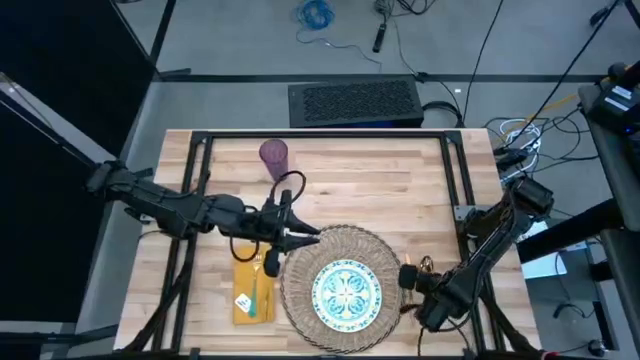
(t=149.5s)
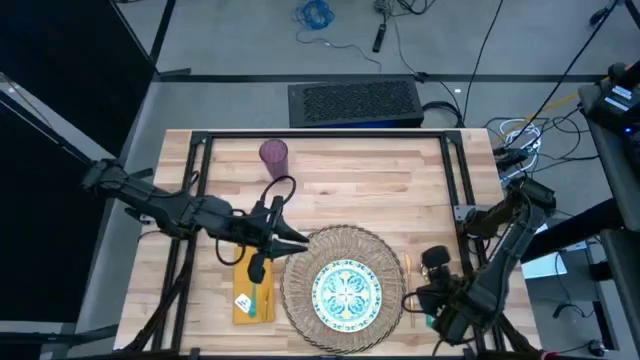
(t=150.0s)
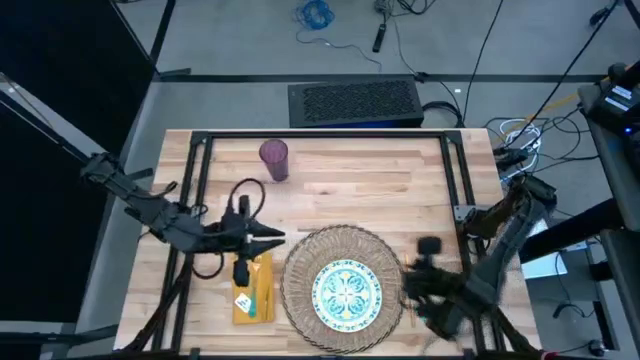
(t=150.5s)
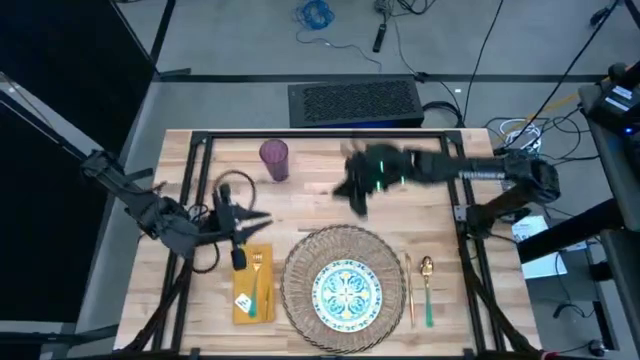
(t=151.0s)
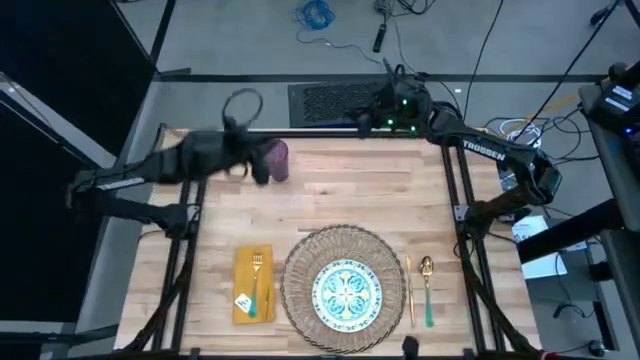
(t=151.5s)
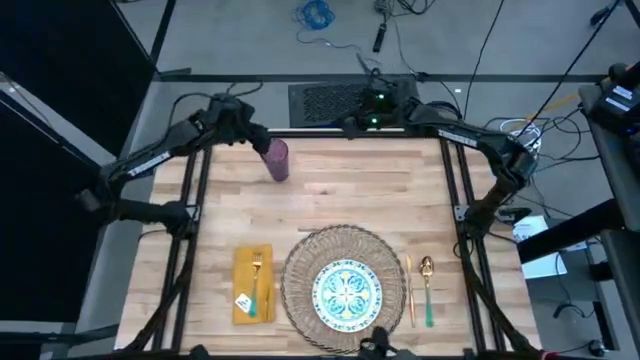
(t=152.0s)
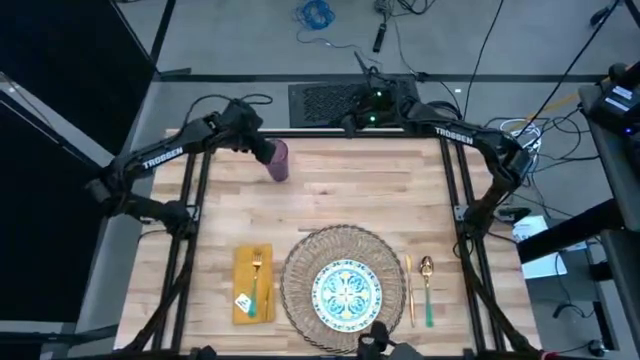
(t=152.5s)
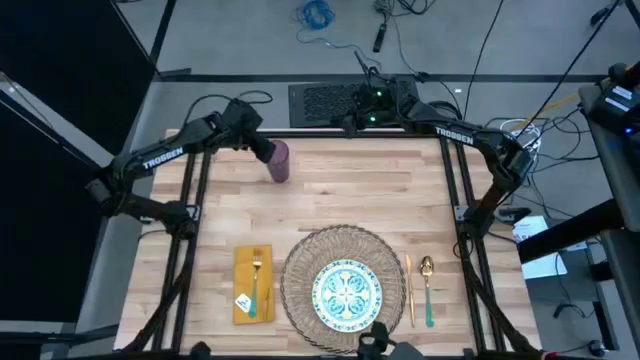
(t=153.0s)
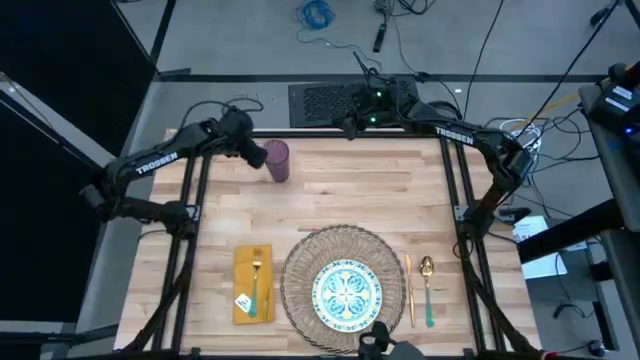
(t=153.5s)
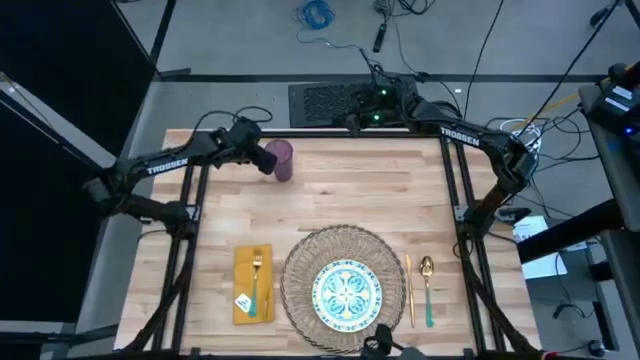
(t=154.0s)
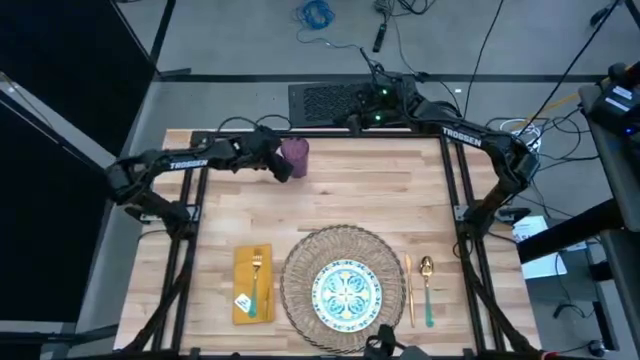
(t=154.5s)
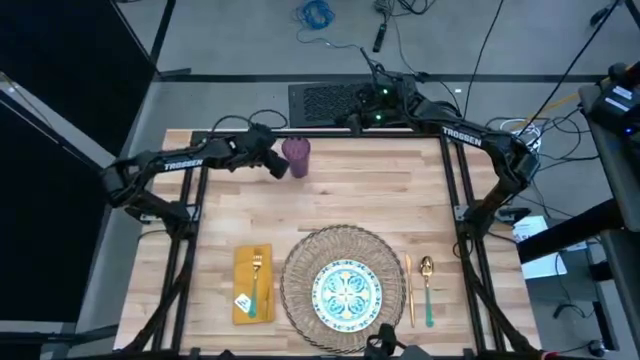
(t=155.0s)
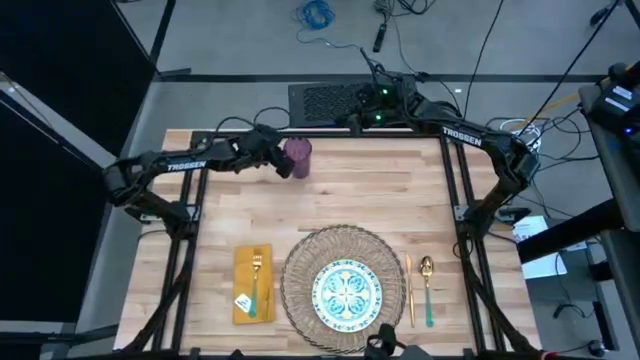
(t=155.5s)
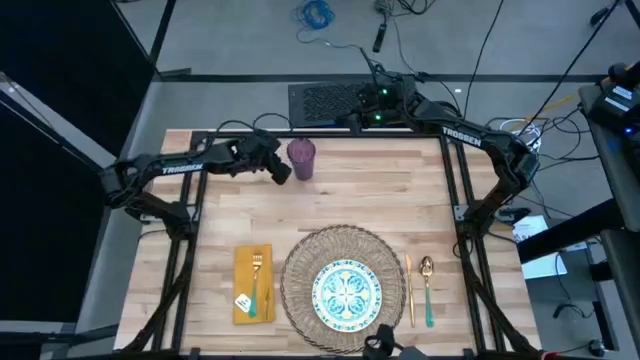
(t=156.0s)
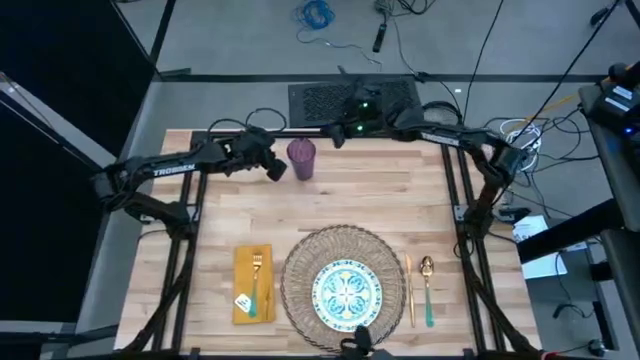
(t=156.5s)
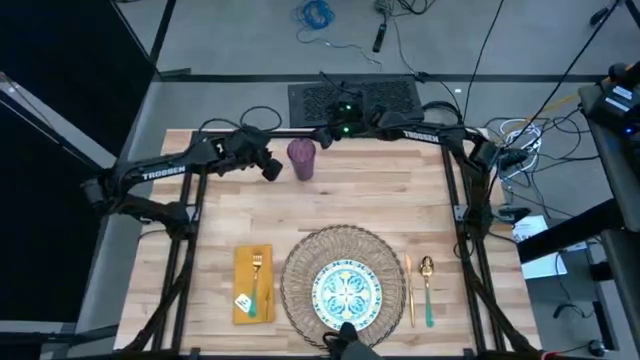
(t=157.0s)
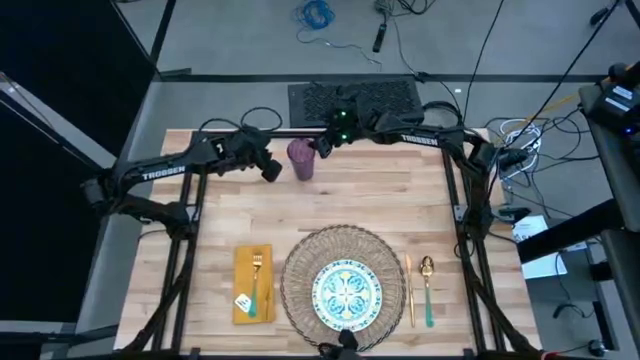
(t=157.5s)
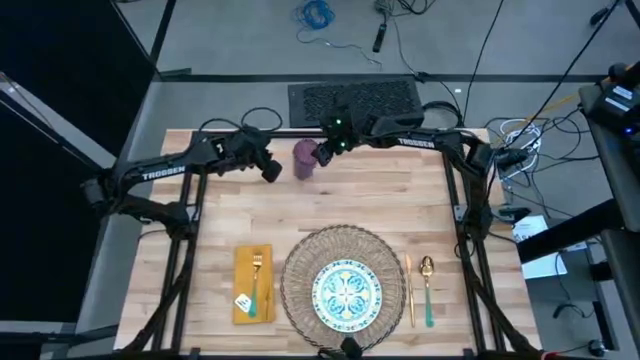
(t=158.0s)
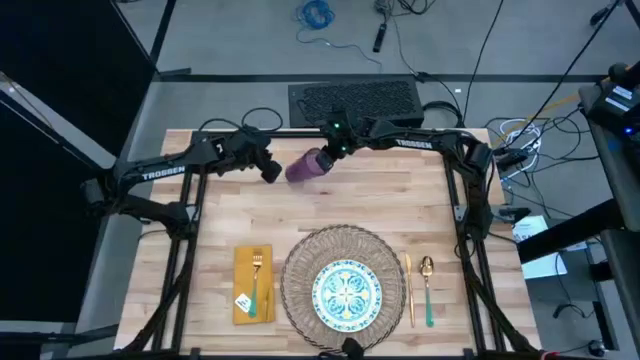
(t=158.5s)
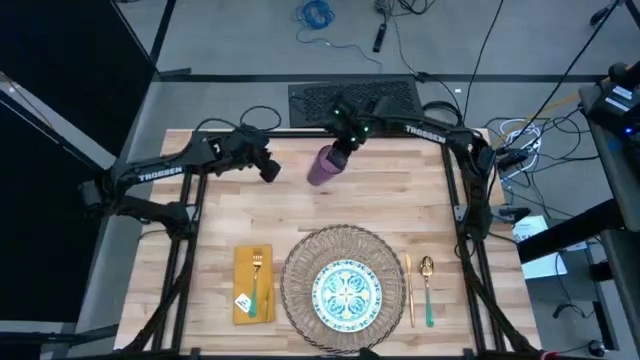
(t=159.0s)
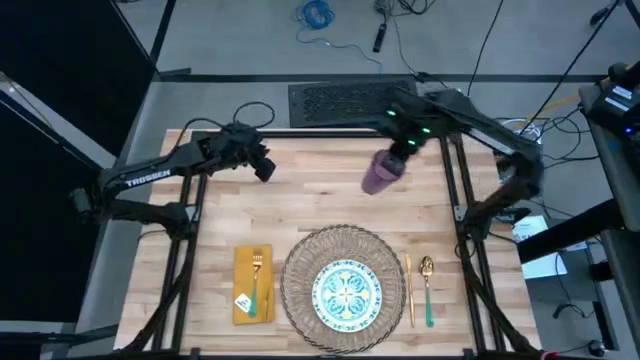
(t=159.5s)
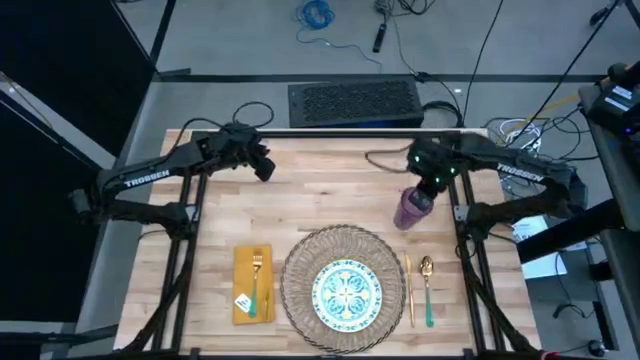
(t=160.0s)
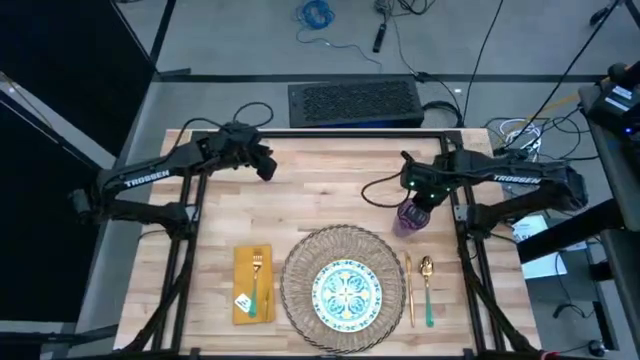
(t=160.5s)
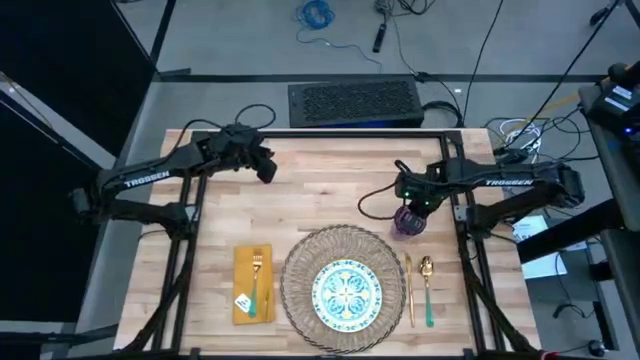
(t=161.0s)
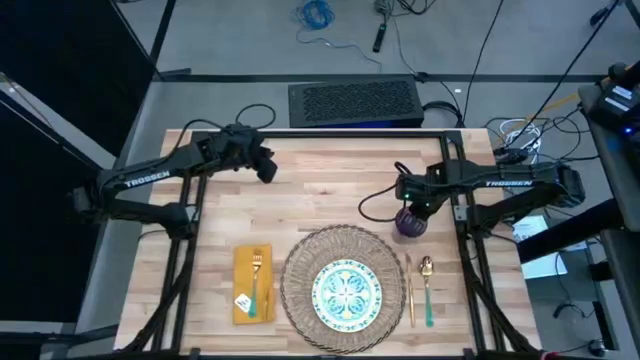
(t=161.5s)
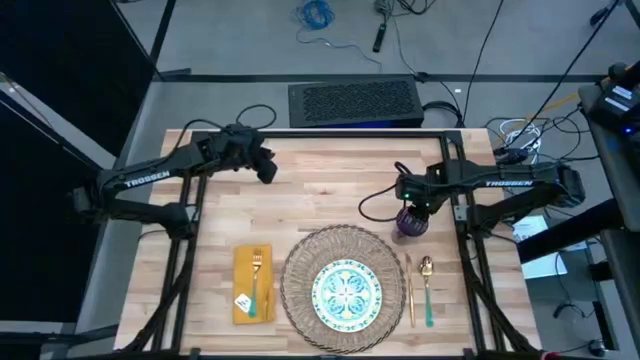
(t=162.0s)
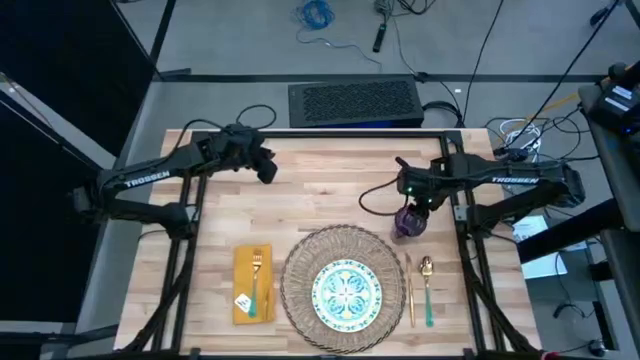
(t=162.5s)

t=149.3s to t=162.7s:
Task: Set table place
Move the violet cup to the top of the brown placemat
